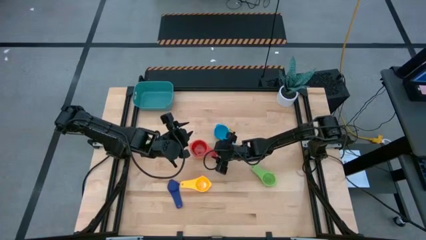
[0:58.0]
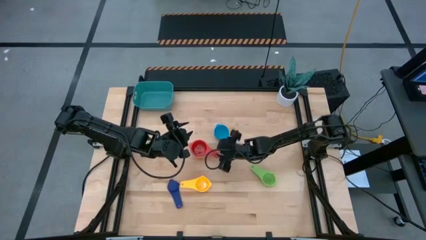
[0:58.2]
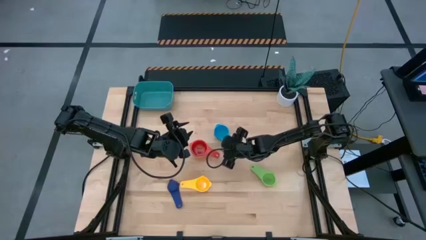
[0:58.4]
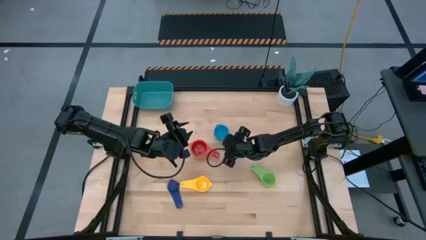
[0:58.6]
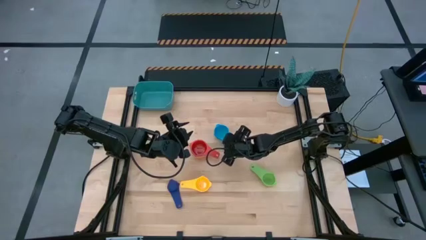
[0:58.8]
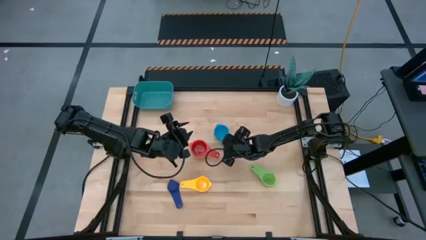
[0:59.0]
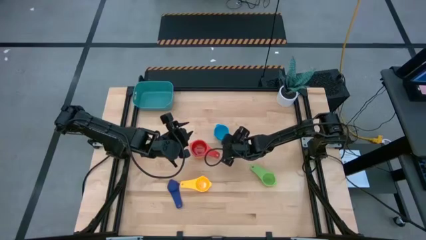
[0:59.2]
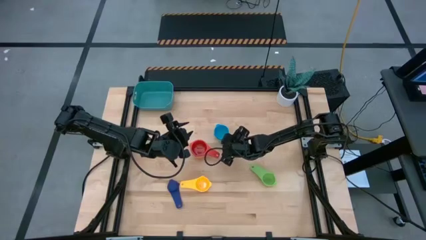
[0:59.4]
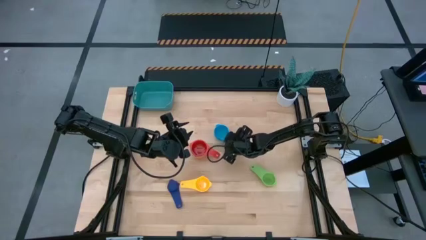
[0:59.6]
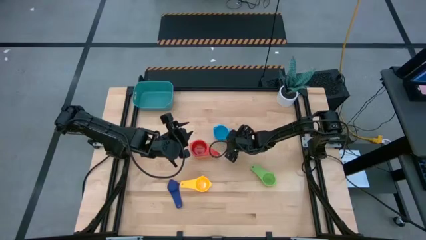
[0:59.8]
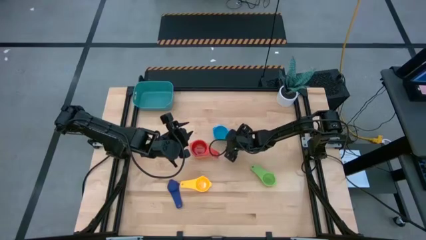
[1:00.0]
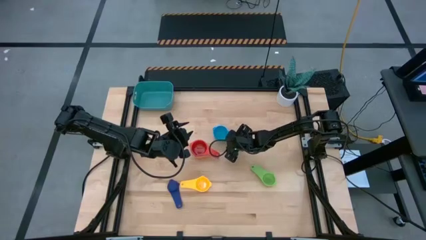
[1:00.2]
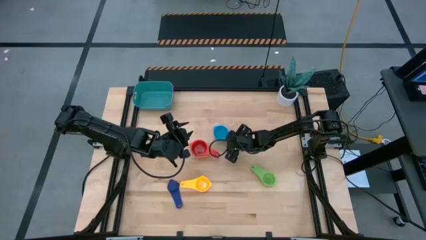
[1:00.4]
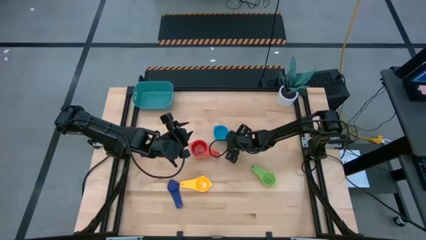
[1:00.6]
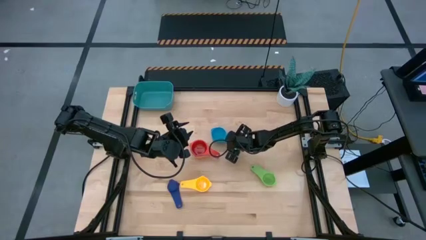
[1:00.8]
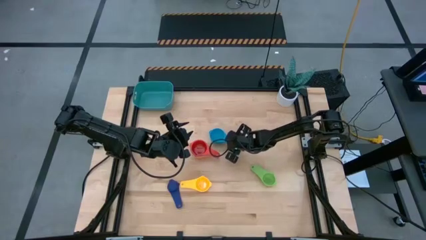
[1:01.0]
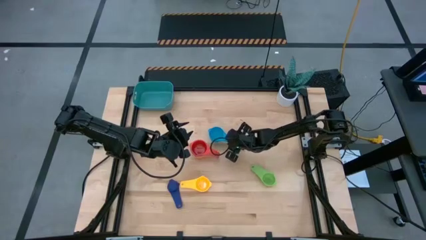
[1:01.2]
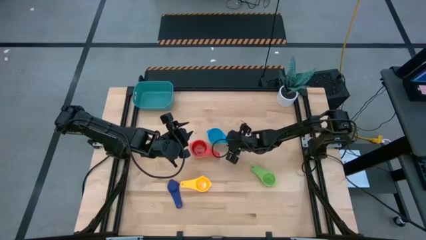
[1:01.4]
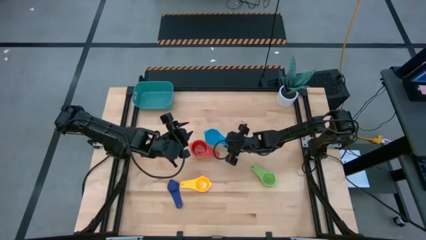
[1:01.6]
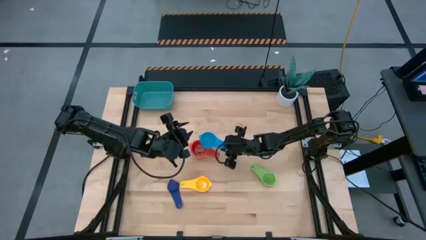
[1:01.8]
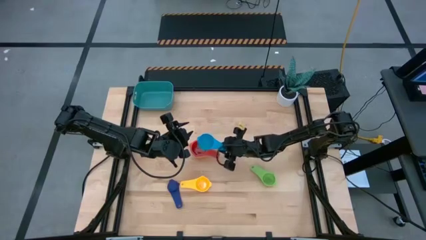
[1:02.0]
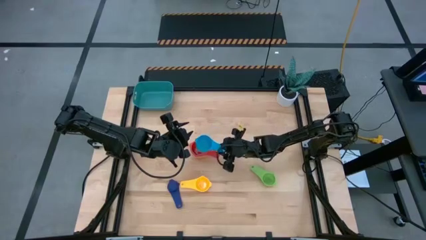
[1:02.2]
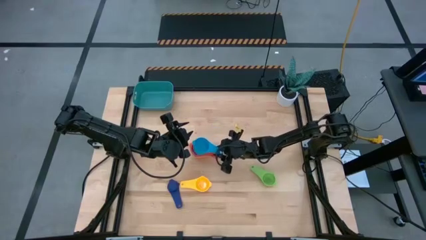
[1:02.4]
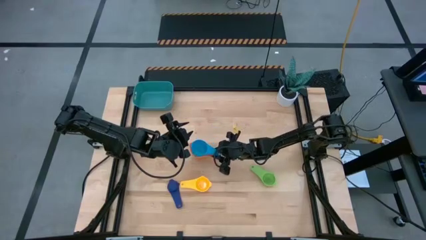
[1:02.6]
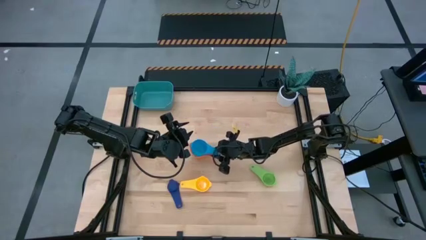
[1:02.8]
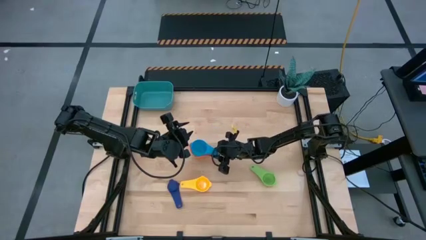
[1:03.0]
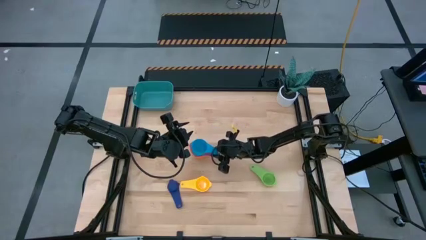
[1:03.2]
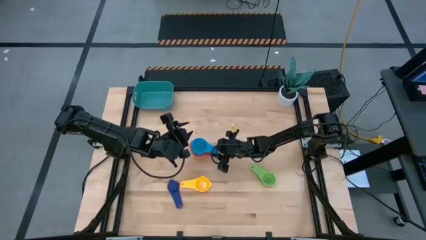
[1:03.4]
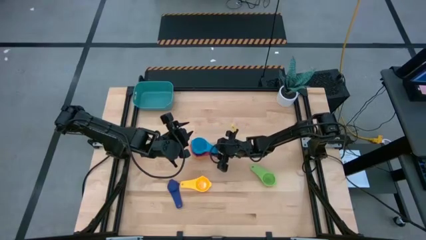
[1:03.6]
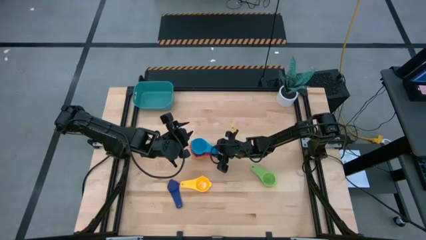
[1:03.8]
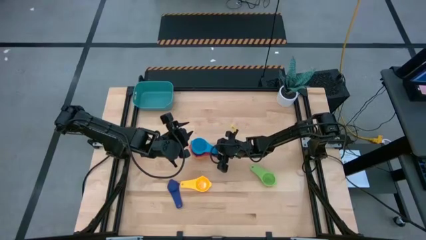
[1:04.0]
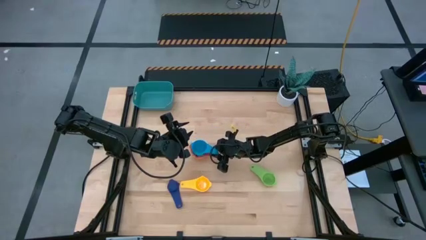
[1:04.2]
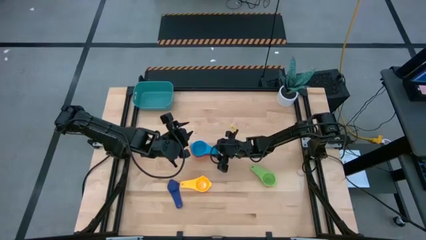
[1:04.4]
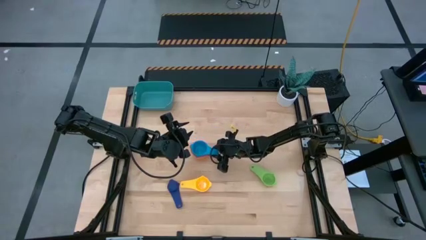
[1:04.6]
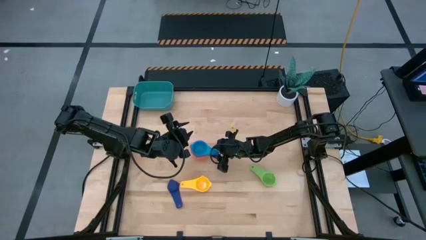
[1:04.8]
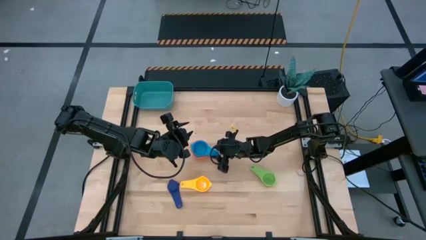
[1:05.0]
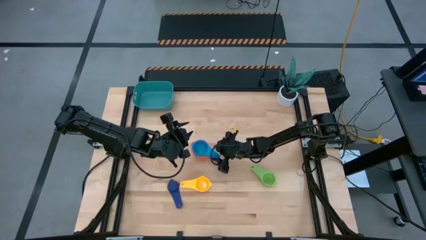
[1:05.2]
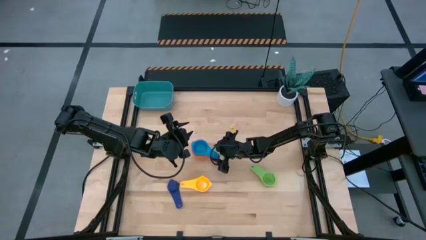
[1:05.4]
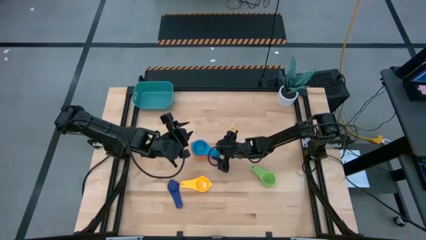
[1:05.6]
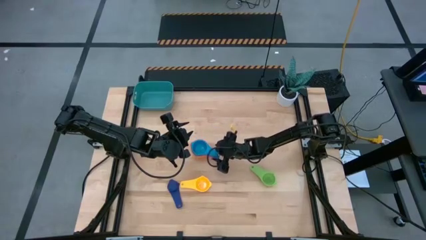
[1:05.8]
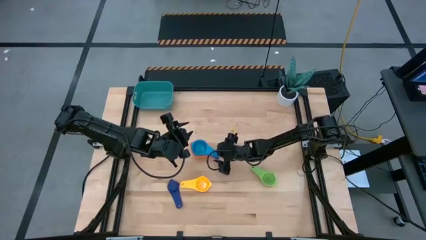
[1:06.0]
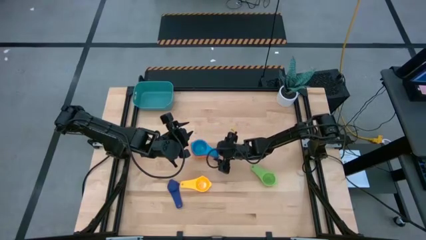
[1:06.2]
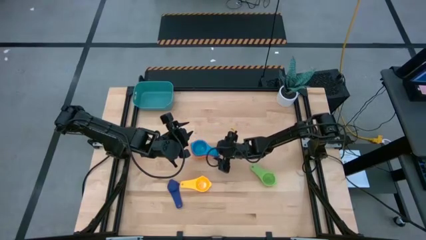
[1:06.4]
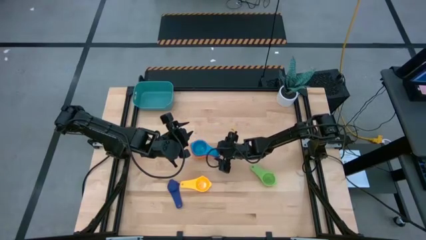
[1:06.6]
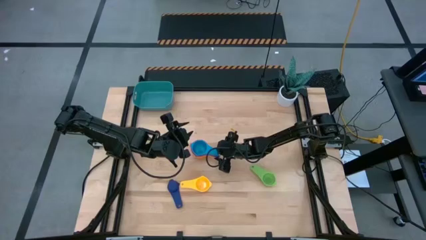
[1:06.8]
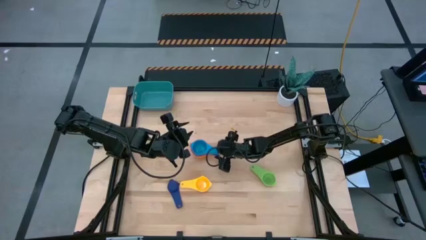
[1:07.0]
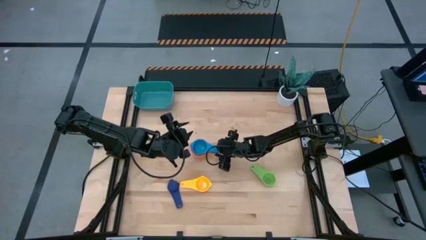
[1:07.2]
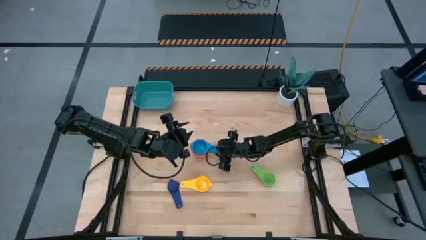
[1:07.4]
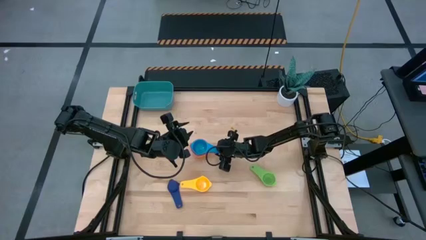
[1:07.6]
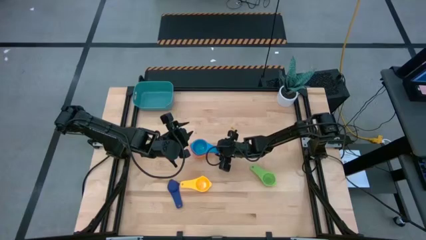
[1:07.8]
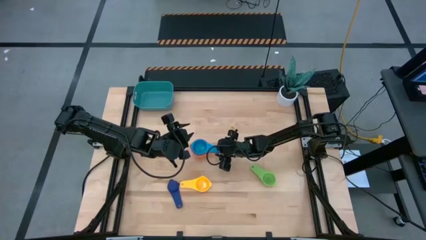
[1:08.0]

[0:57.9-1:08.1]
Task: Nest measuring cups in basket
Stack the light blue measuring cup on top of the red measuring cup

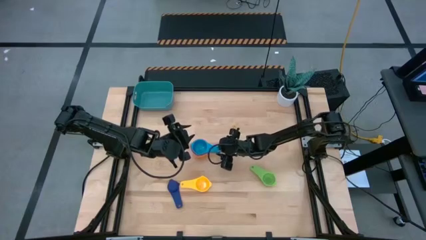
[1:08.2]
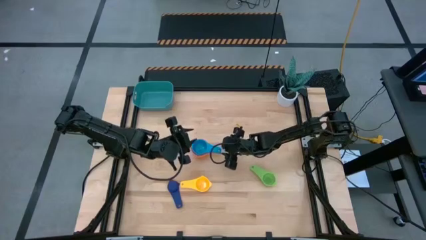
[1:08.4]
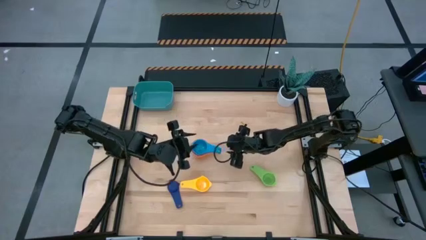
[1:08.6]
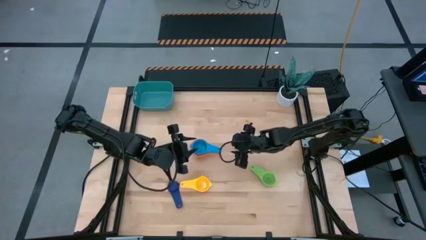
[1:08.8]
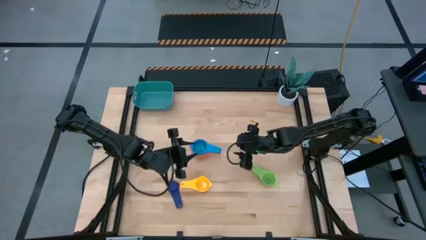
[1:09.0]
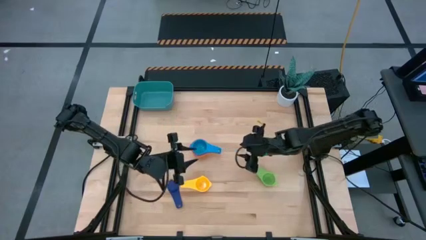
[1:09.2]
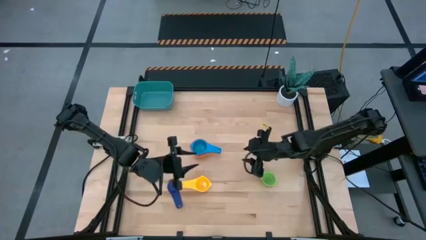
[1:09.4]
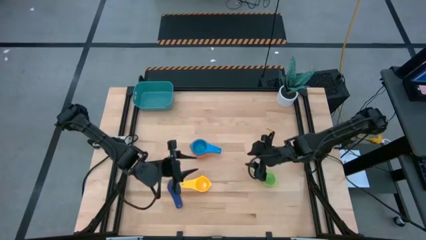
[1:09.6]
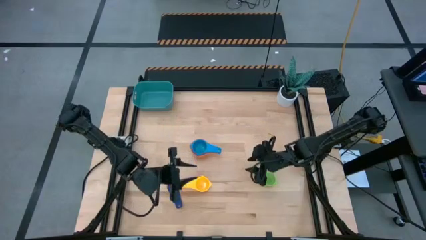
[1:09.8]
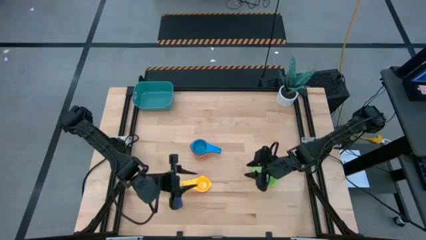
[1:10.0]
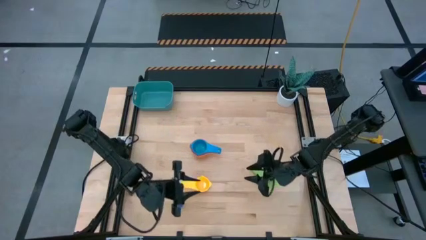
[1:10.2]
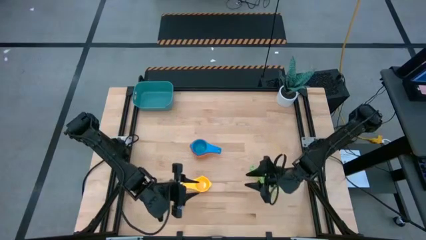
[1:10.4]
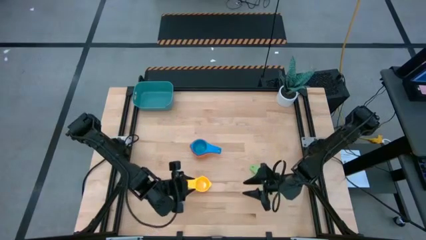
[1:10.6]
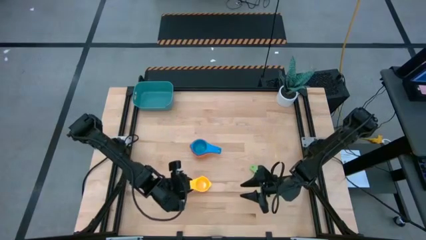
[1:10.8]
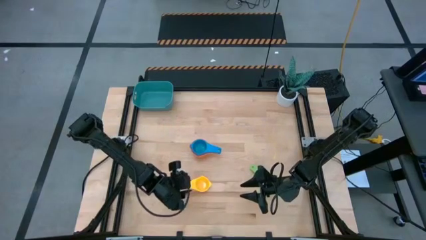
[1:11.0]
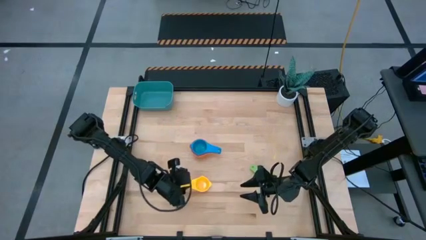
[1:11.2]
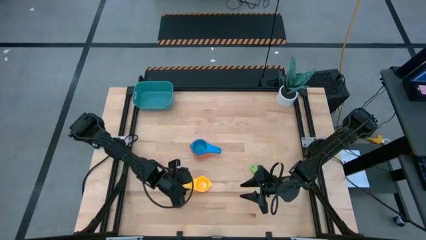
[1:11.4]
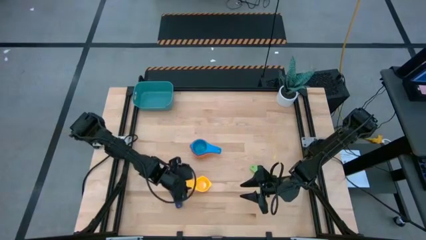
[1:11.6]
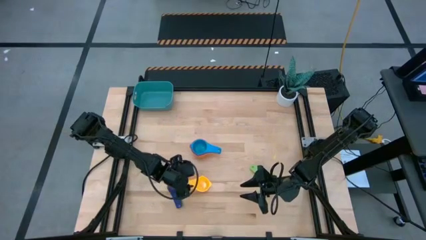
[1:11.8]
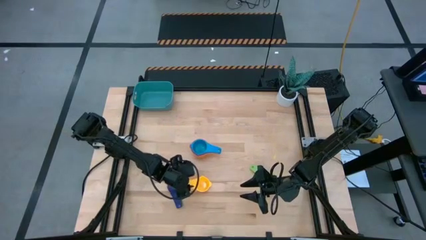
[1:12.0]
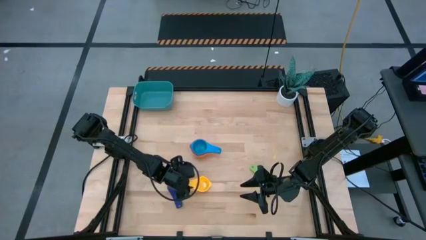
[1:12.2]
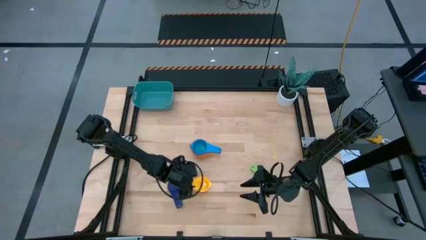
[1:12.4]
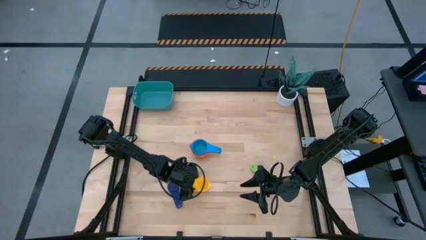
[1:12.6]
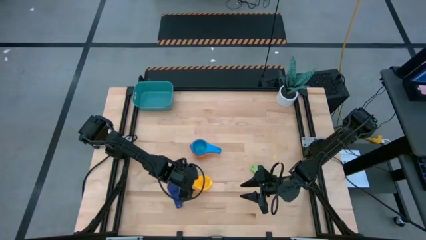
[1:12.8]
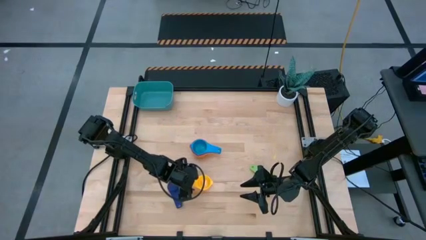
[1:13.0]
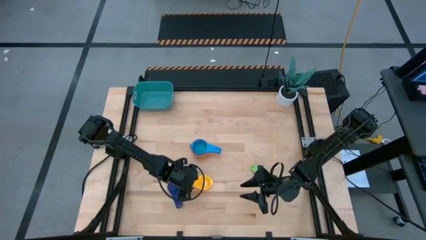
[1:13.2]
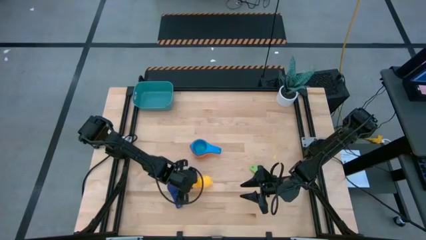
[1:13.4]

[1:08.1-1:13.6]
Stack the yellow measuring cup on top the light blue measuring cup

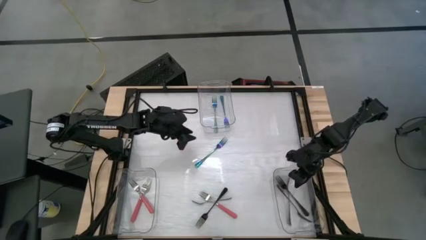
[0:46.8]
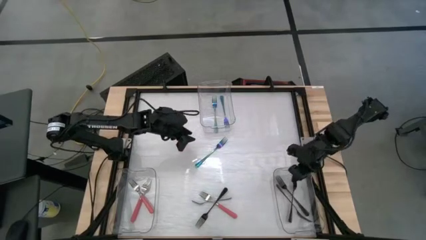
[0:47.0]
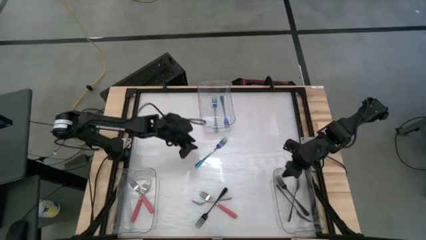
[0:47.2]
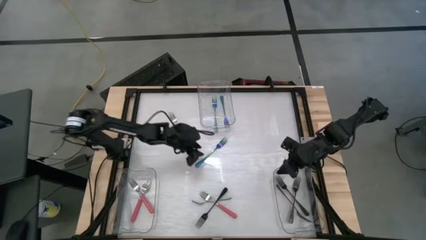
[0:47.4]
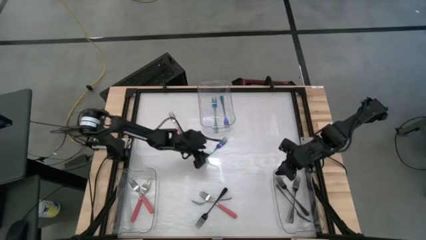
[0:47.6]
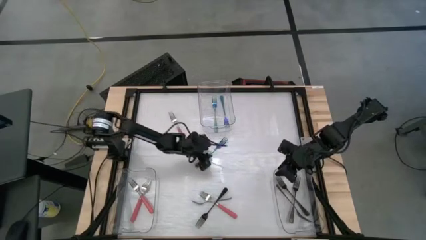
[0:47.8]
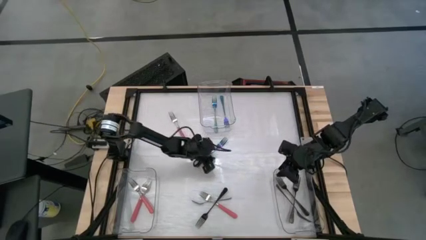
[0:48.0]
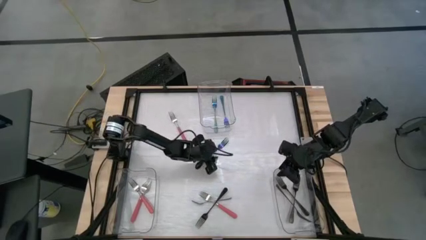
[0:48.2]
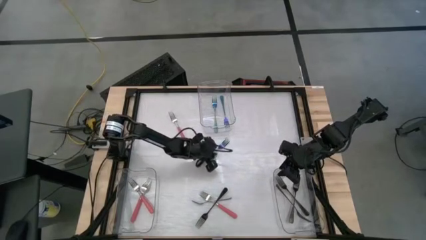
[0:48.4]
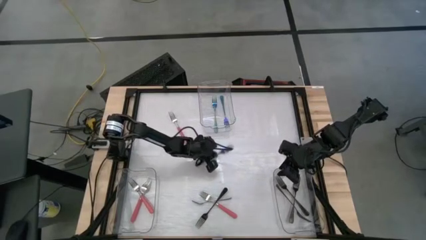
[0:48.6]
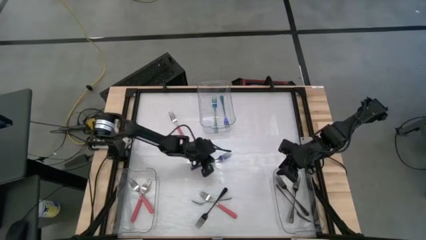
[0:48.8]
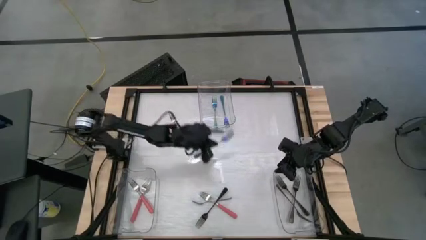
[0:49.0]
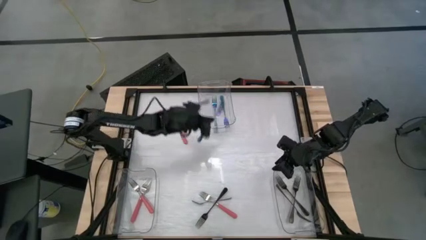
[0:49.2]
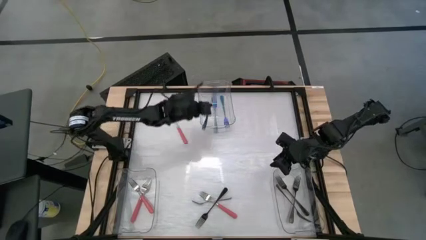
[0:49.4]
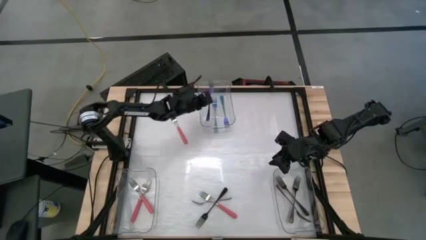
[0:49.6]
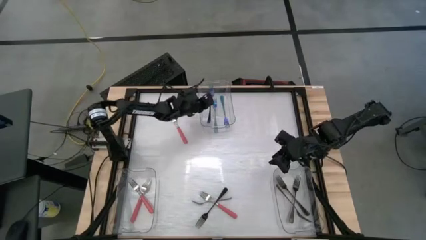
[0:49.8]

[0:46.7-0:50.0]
Task: Sort silverware by color (type)
Put the titanium rainbow fork into the top transparent bin
